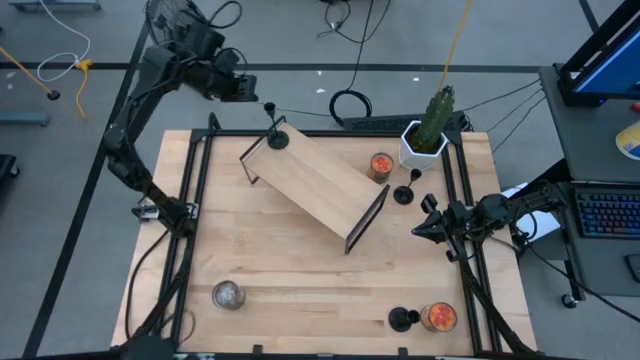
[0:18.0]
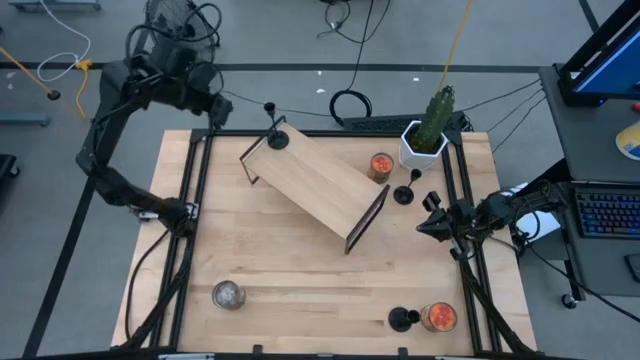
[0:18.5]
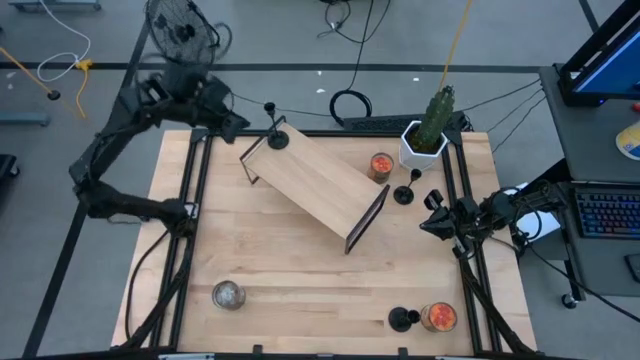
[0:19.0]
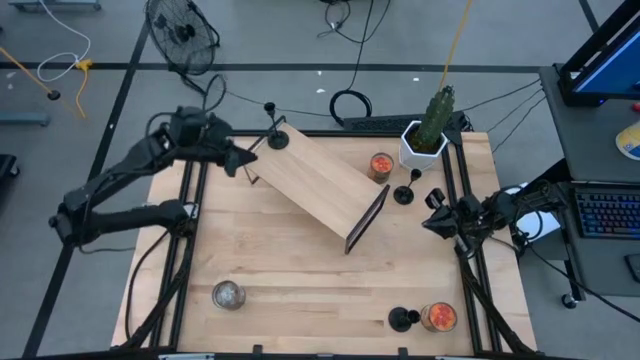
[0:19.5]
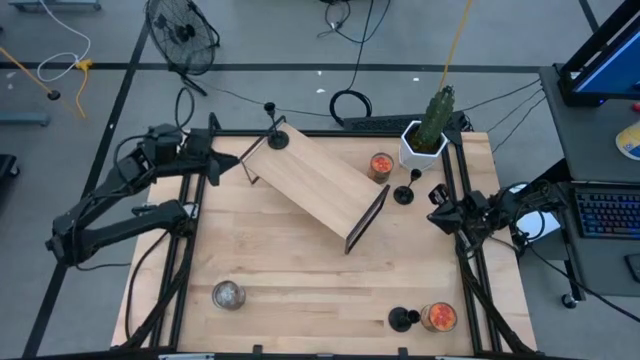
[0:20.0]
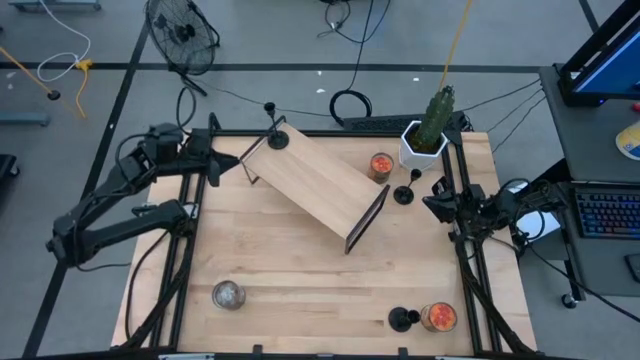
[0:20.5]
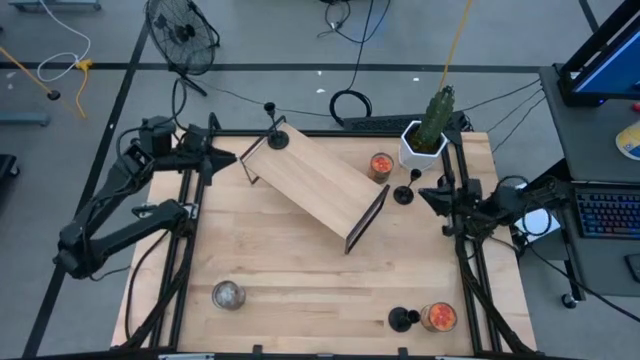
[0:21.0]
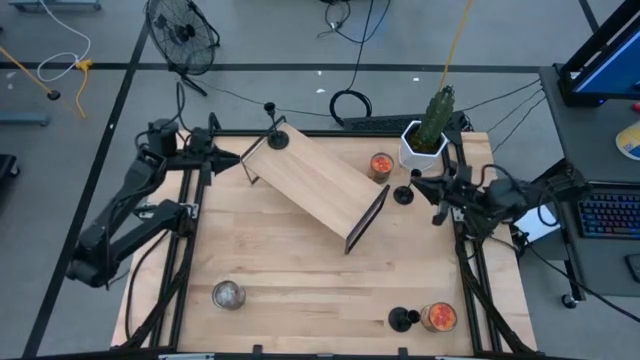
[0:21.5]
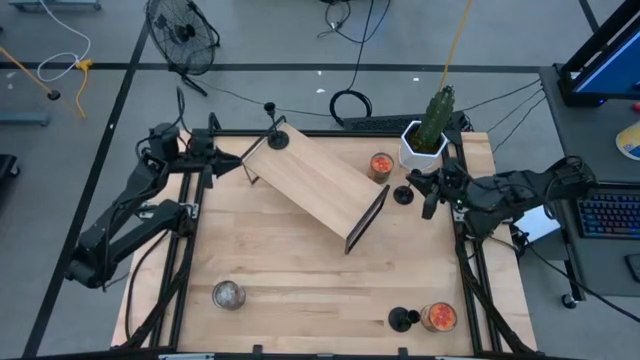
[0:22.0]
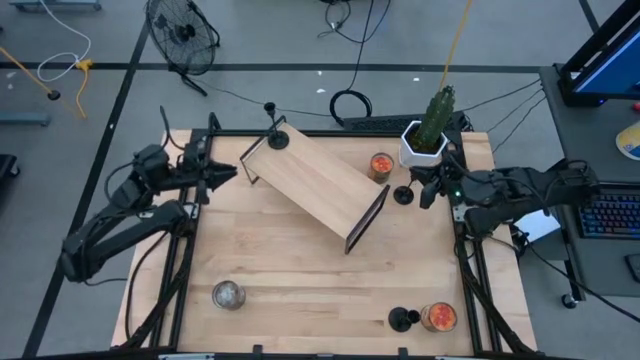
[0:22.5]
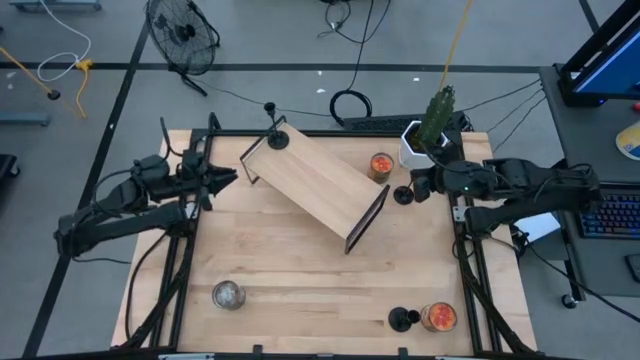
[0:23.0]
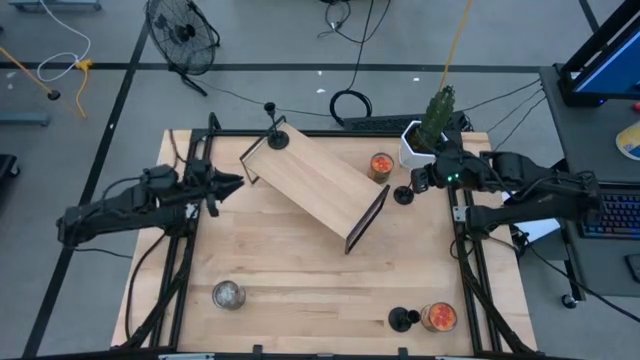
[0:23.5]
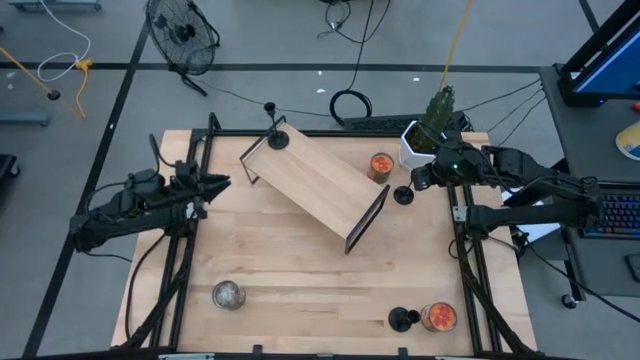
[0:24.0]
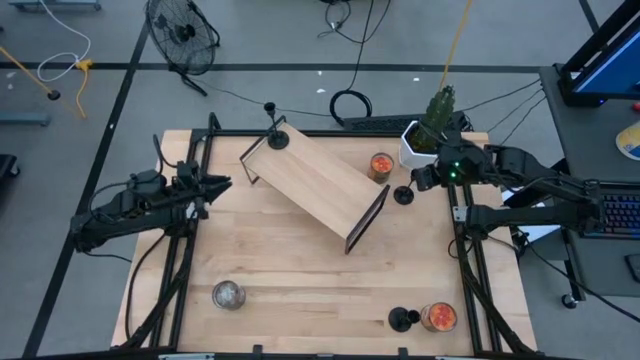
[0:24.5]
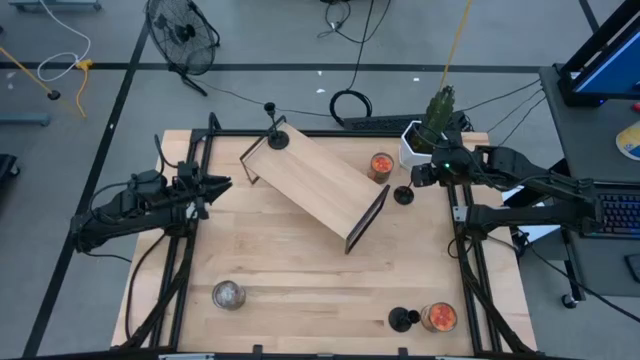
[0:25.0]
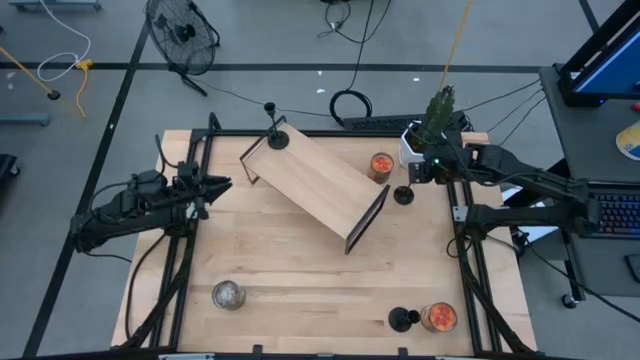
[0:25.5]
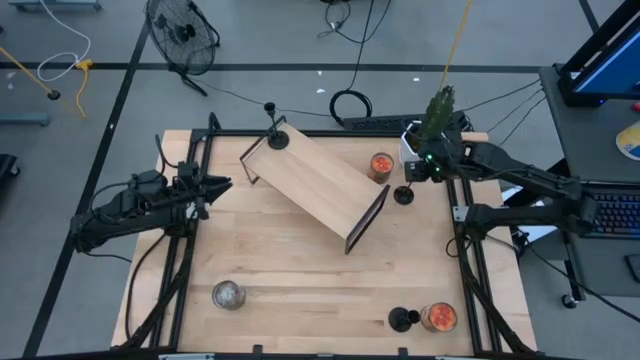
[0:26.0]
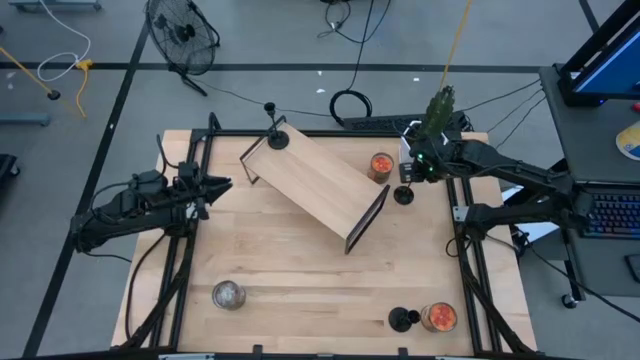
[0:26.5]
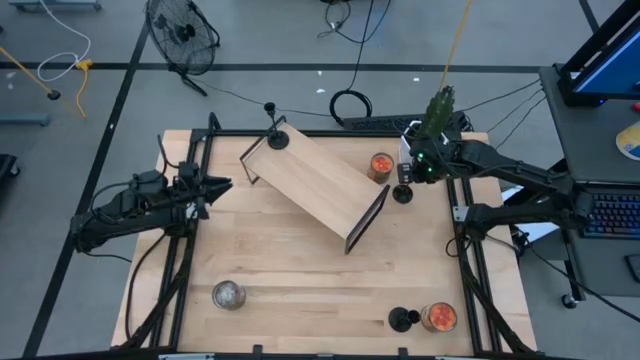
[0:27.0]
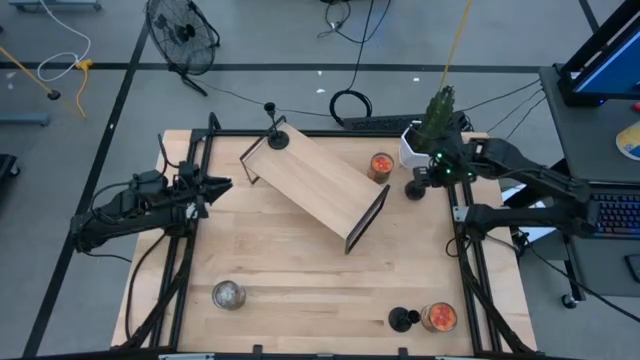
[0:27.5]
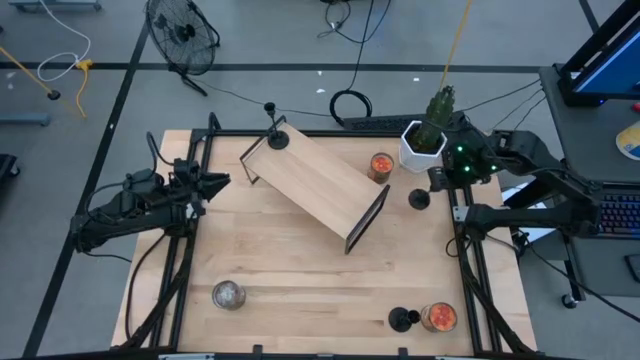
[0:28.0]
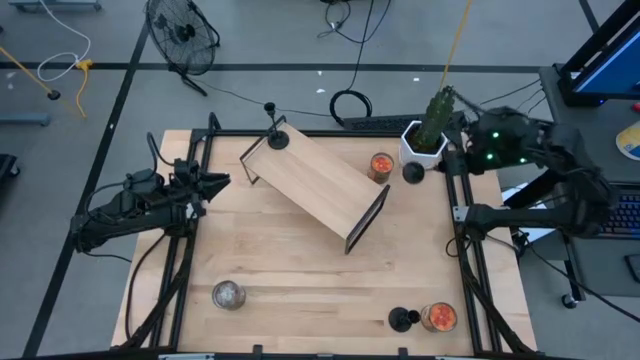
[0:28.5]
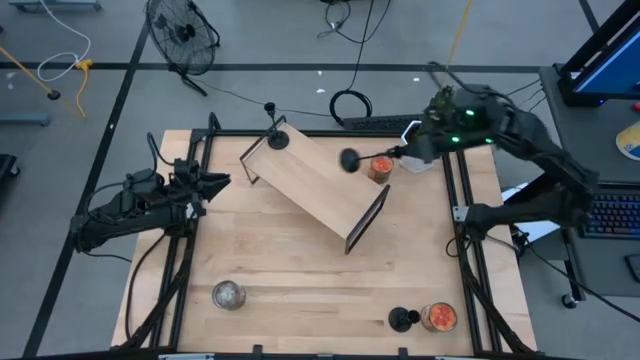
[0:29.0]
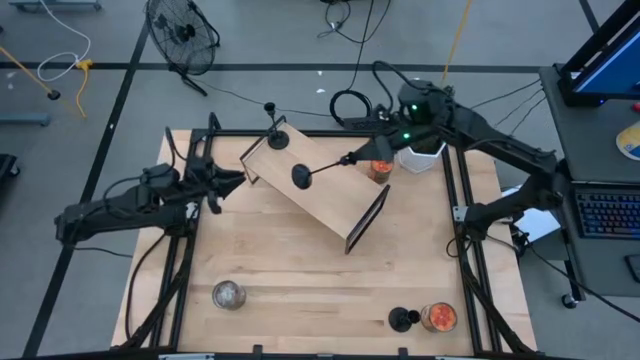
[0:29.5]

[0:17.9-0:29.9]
Task: Pick & Place candle stick holders
Put the top candle holder on the shelf

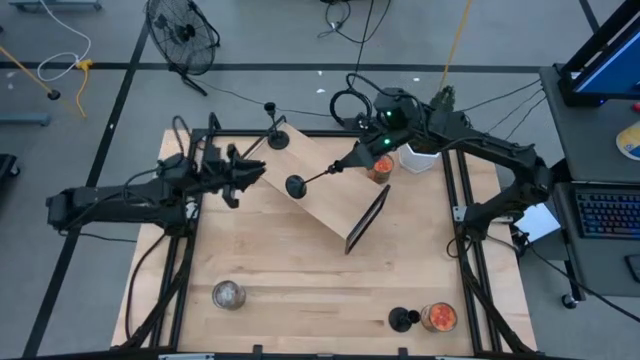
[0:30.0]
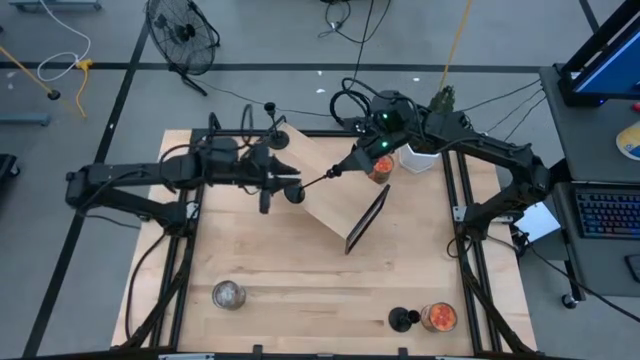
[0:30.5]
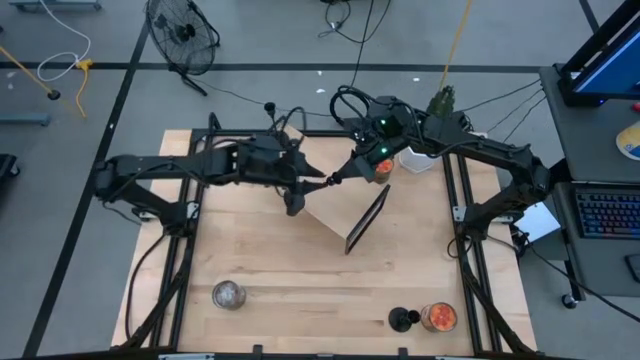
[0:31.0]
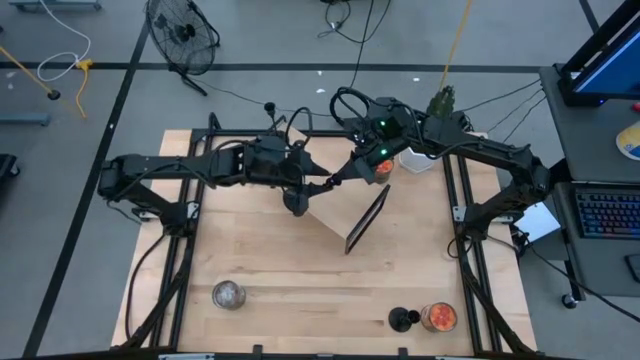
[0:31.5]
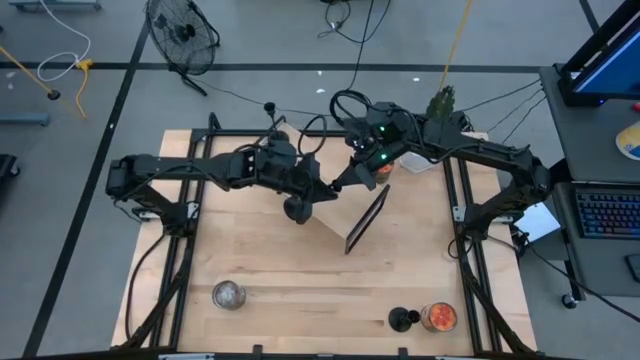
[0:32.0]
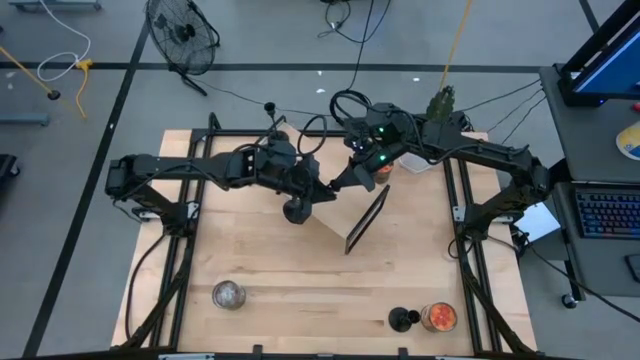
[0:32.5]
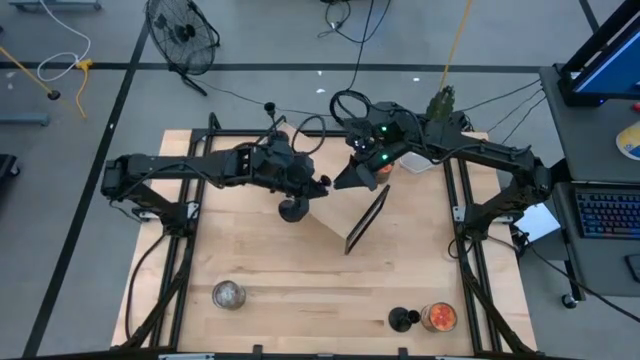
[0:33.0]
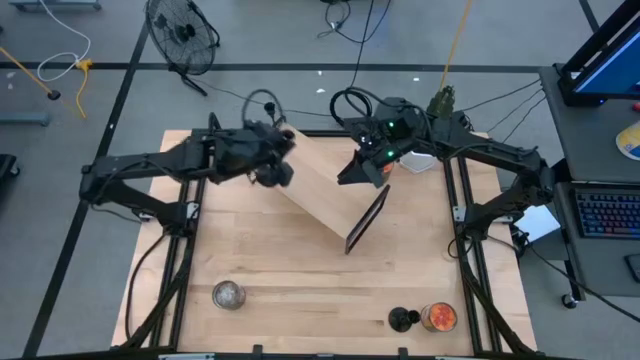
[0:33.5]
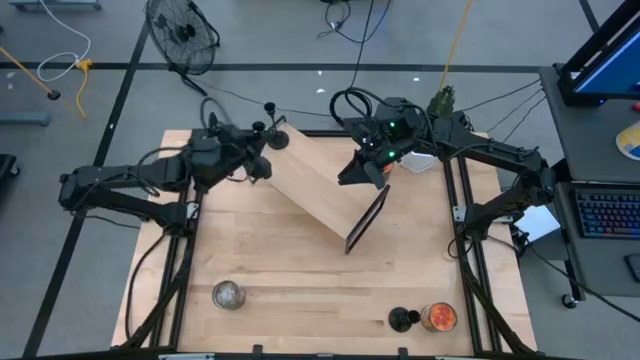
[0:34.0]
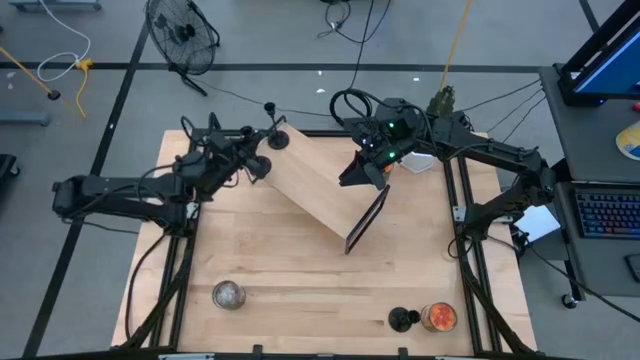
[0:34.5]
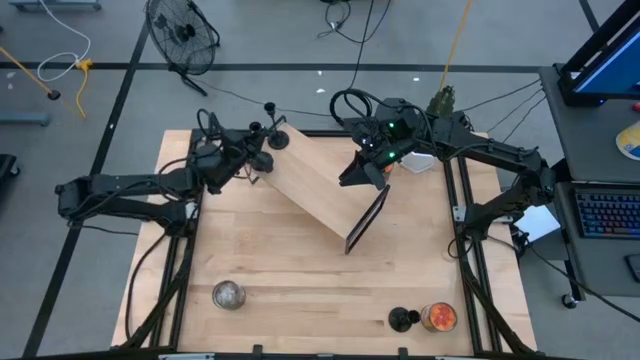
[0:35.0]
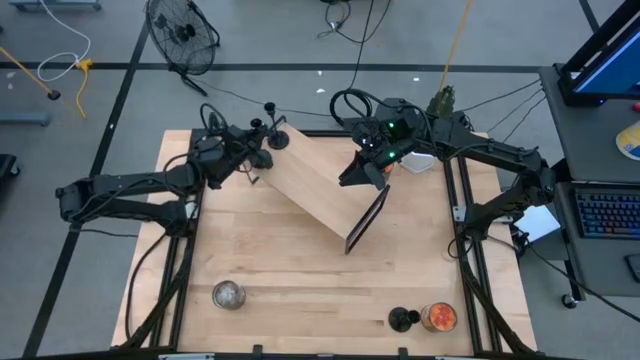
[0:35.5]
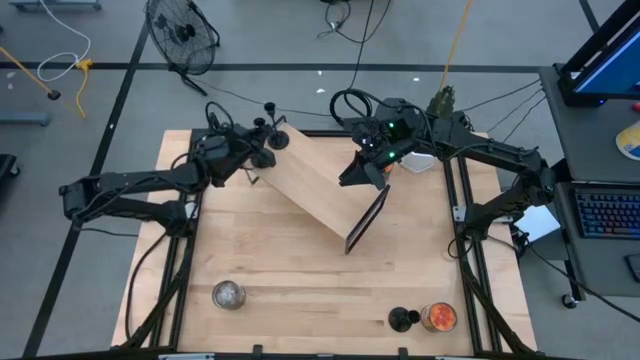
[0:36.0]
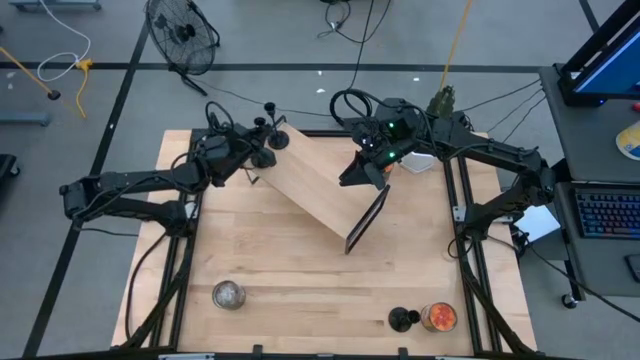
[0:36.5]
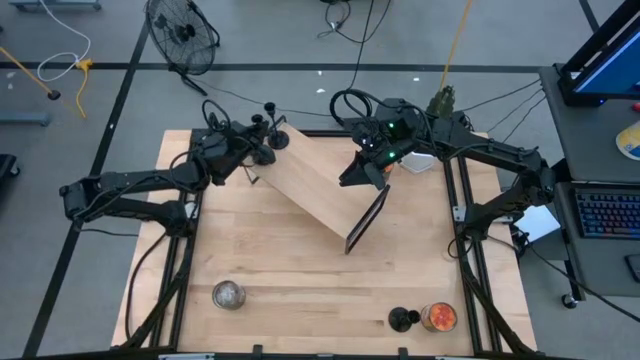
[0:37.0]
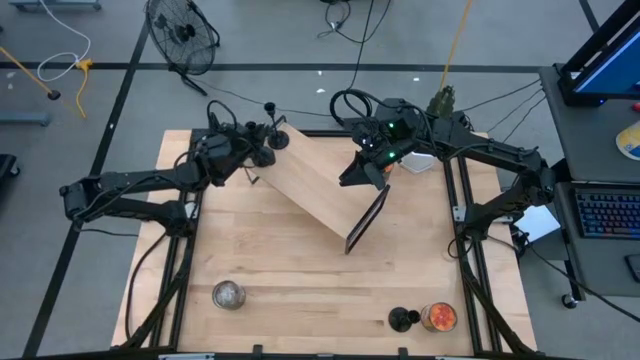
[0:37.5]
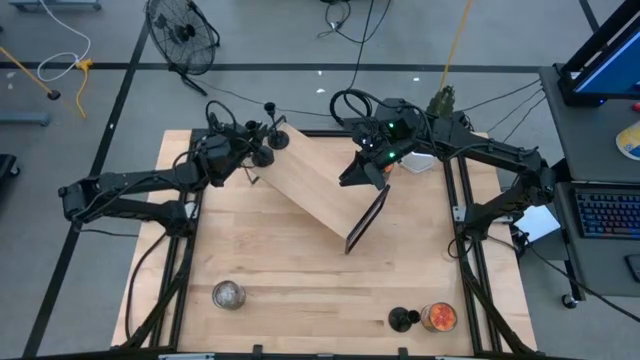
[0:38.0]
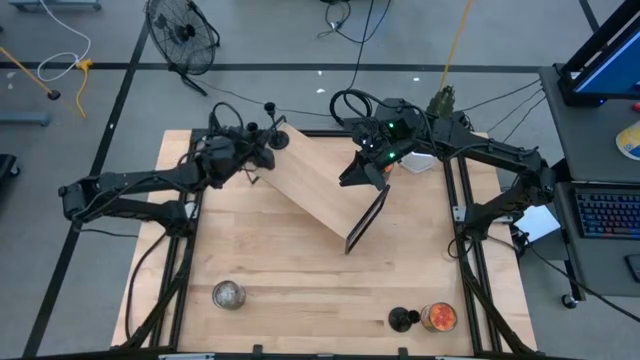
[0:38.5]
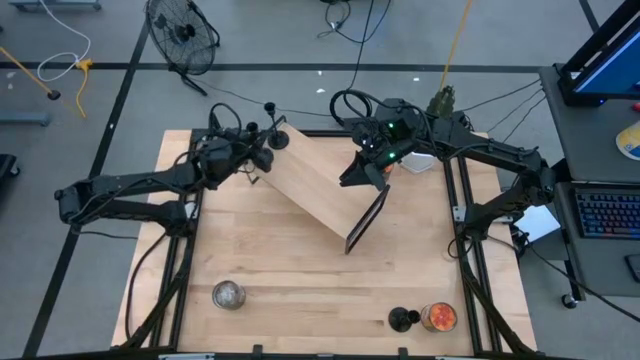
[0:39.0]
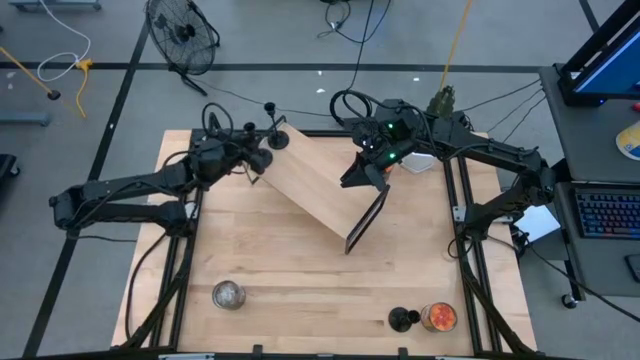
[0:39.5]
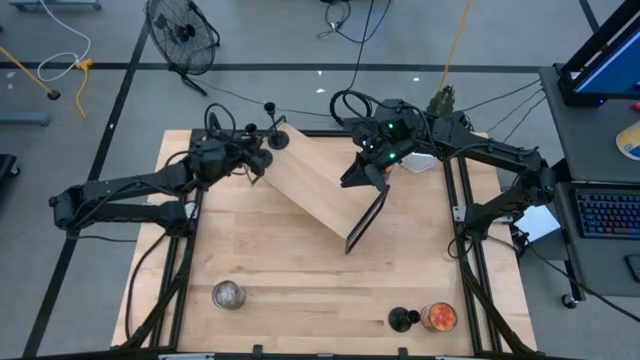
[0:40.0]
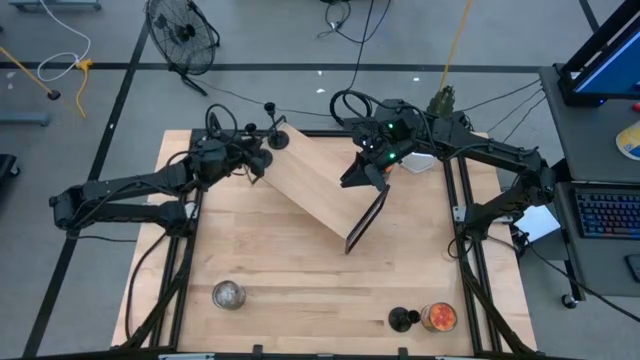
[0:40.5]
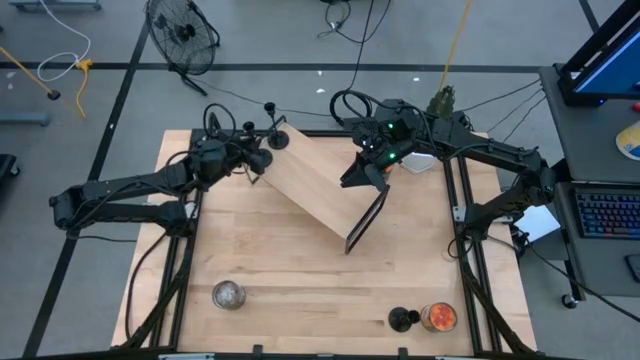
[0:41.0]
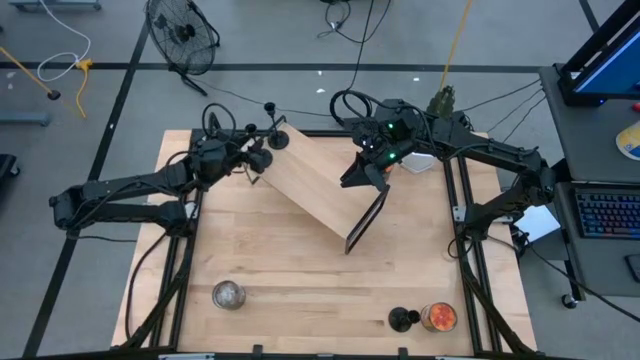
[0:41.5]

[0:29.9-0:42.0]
Put the top candle holder on the shelf
